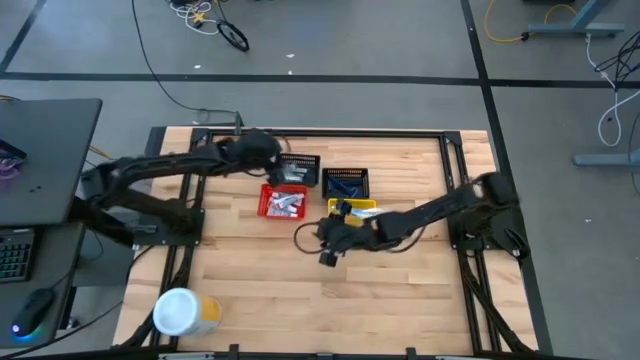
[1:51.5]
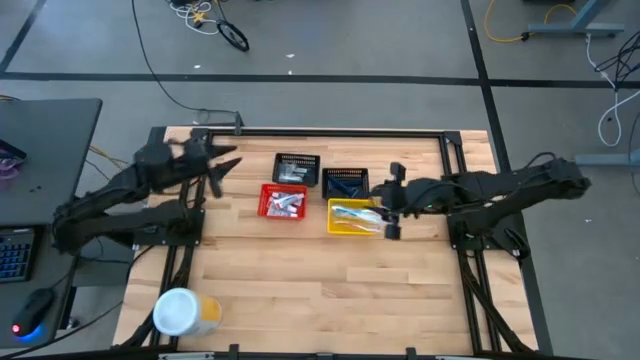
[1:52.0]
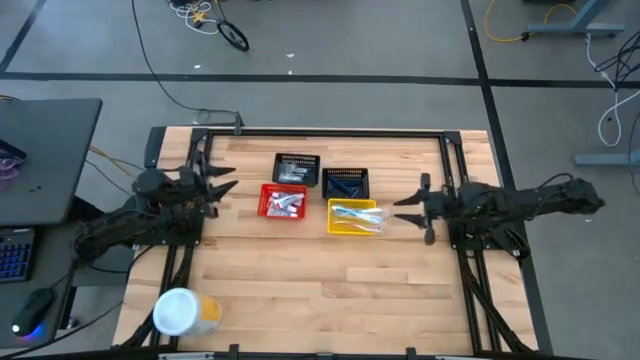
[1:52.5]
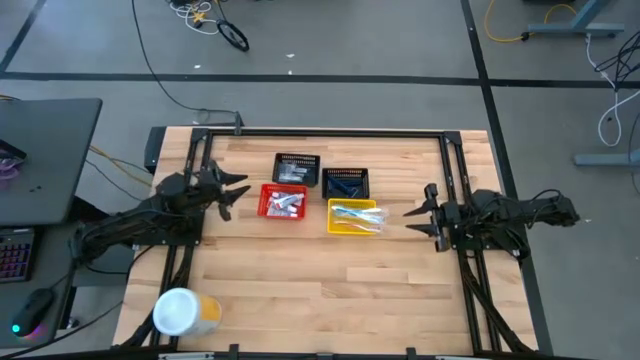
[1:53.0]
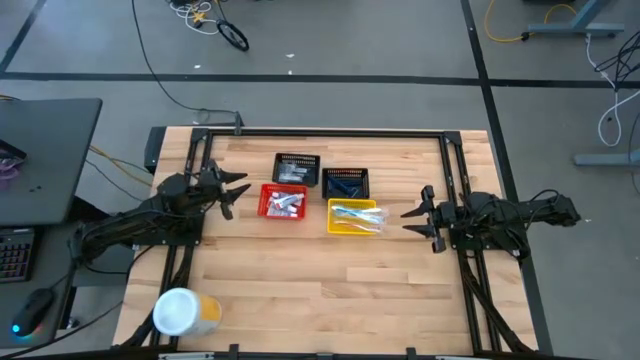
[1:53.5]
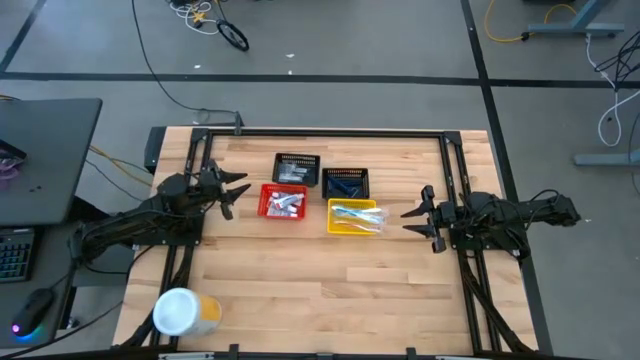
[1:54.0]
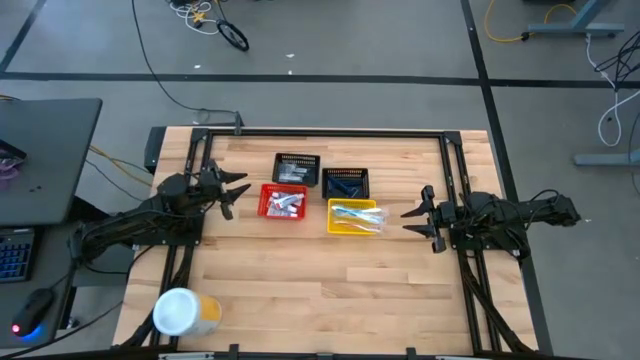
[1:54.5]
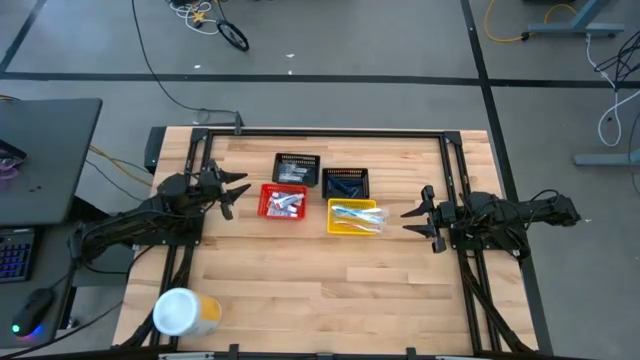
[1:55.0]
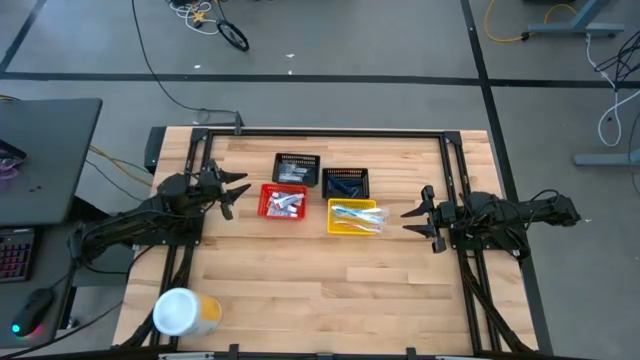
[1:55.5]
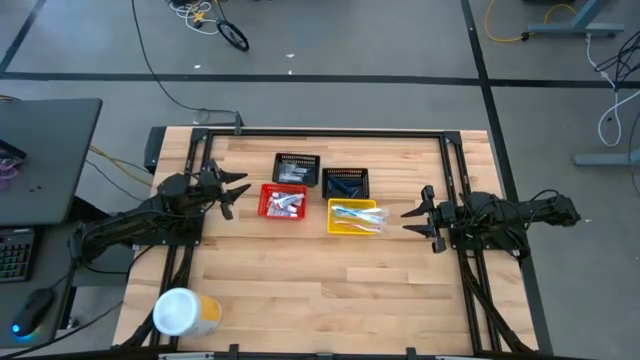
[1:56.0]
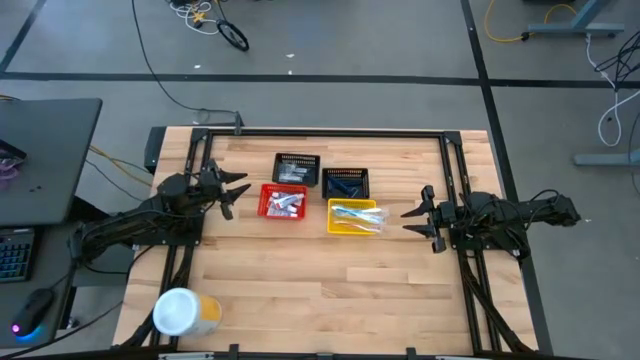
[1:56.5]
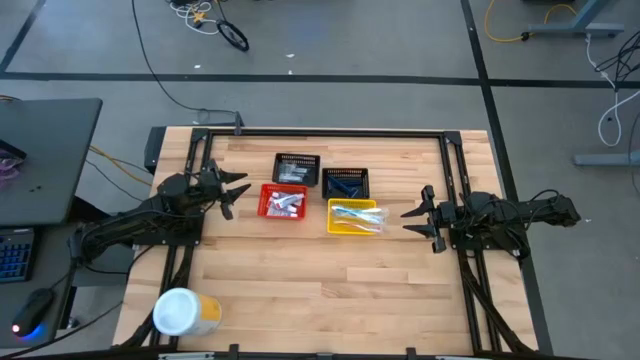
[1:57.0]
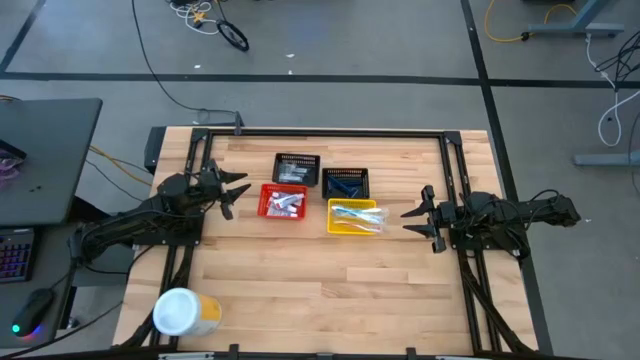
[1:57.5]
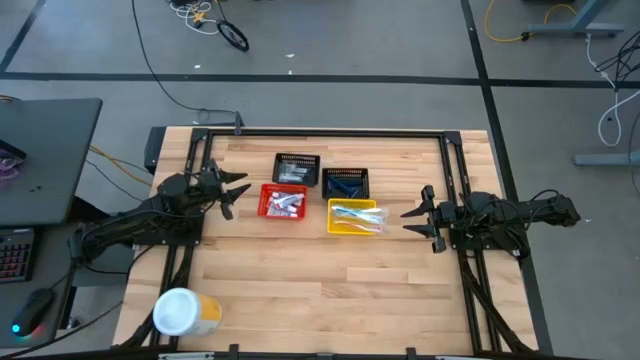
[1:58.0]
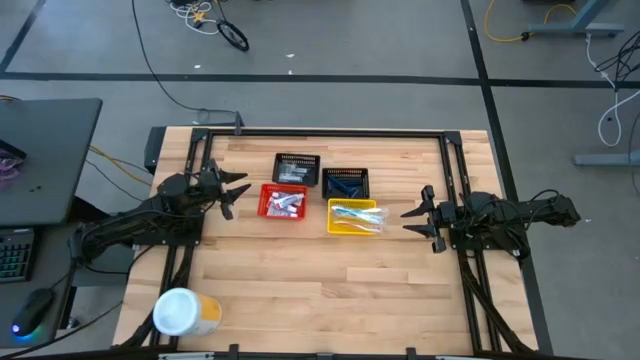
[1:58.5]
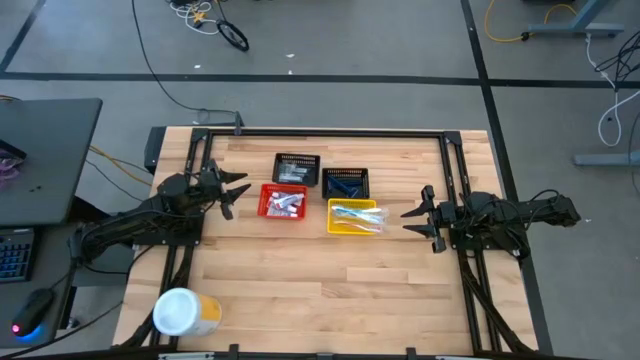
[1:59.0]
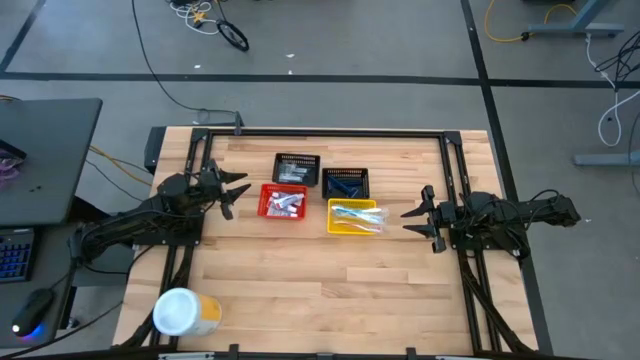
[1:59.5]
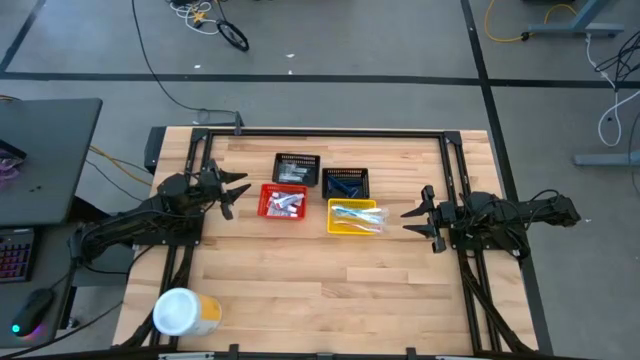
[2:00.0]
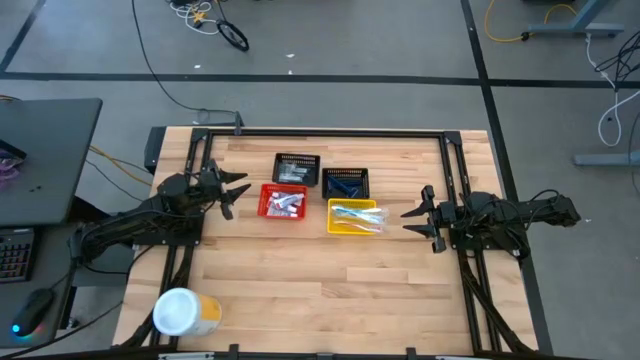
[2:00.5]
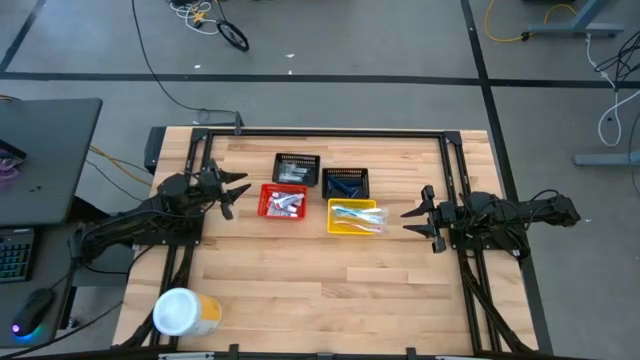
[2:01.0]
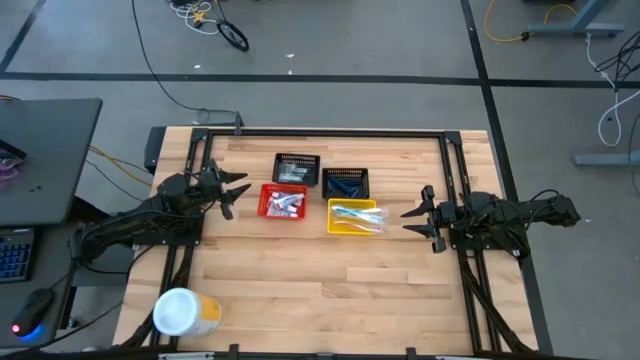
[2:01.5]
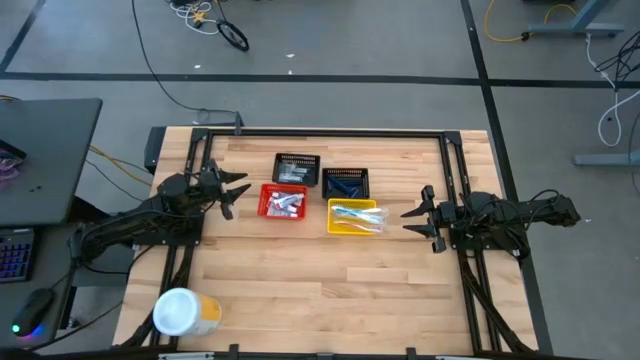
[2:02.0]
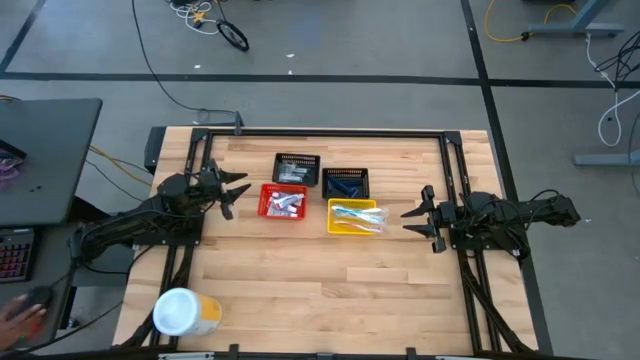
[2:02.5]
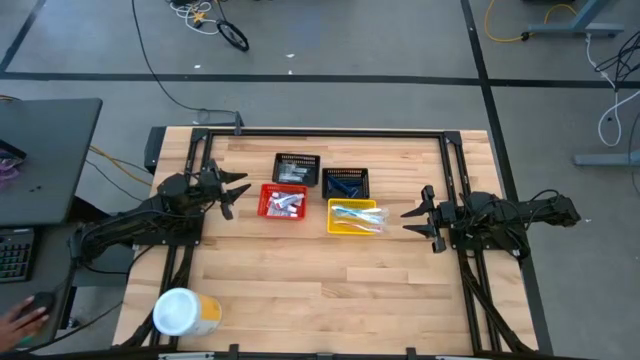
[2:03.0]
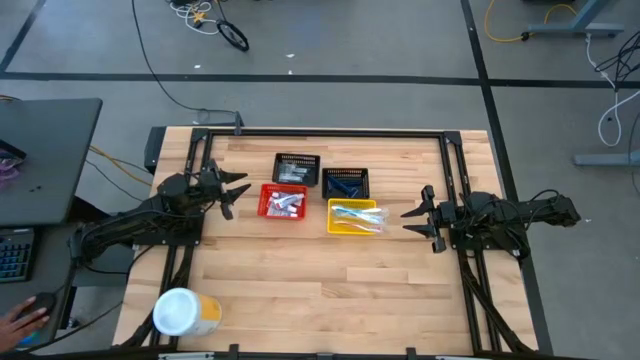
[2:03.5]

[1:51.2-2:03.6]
Task: Pick & Place Travel size toiletries
Return to Home Position

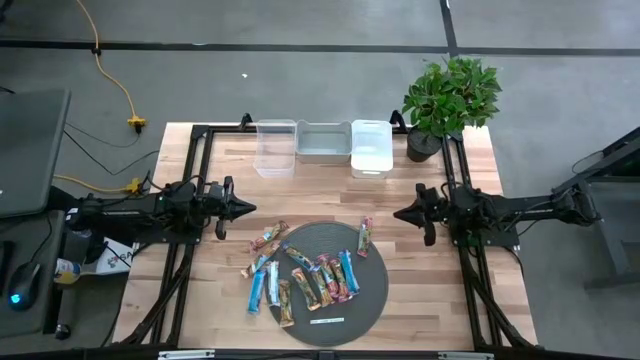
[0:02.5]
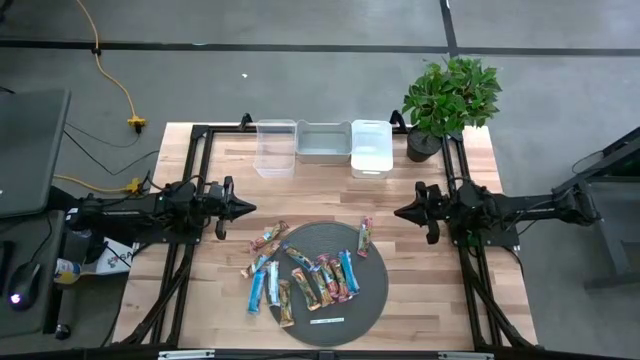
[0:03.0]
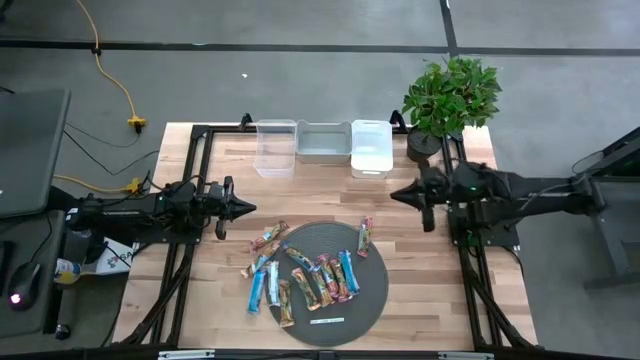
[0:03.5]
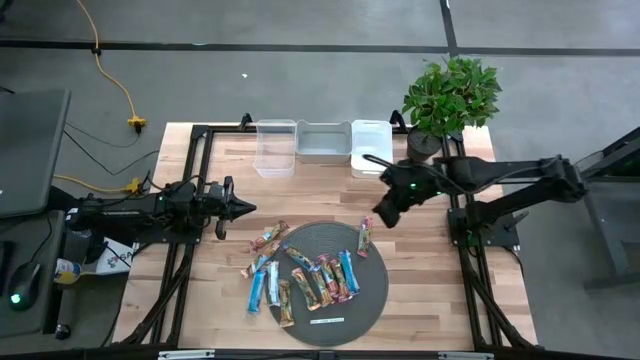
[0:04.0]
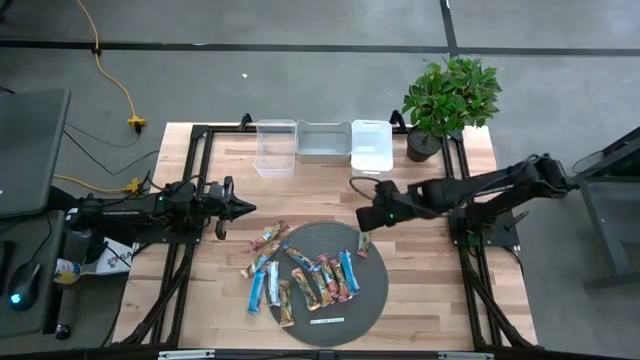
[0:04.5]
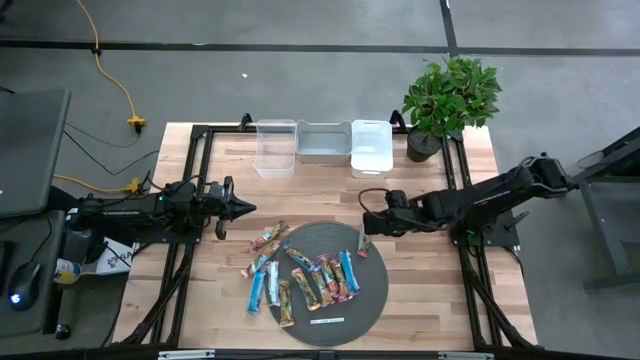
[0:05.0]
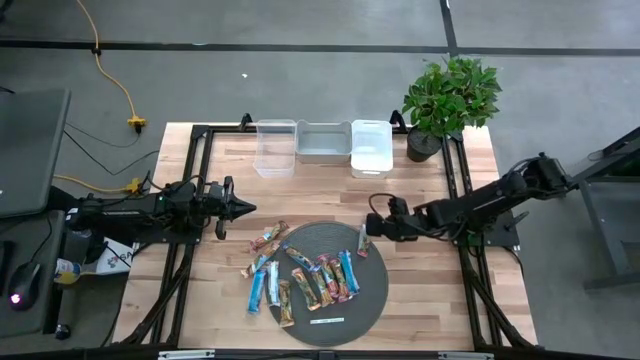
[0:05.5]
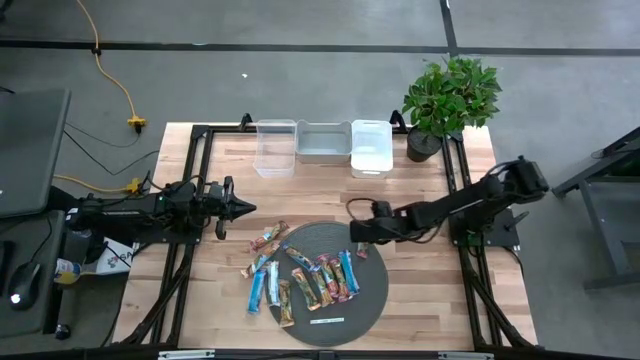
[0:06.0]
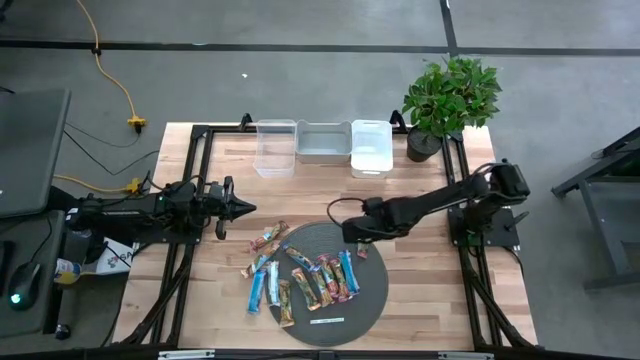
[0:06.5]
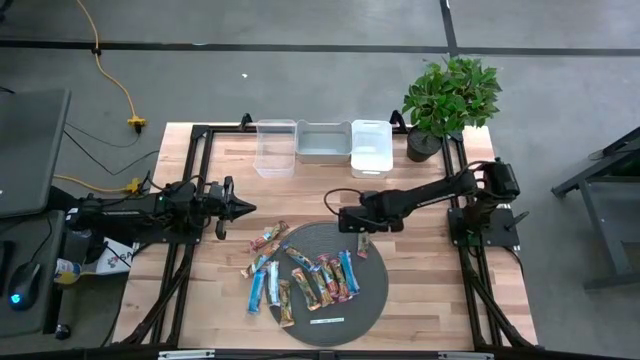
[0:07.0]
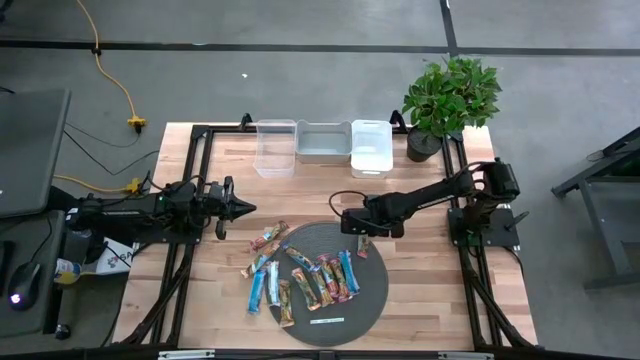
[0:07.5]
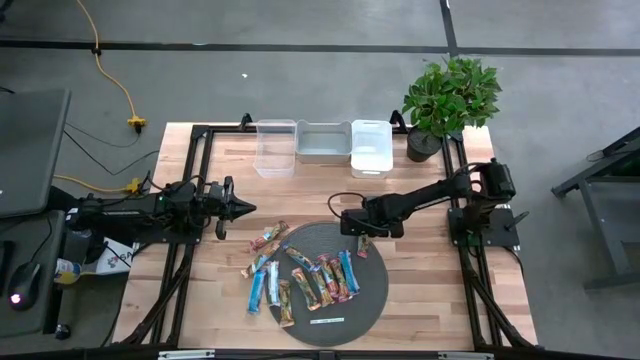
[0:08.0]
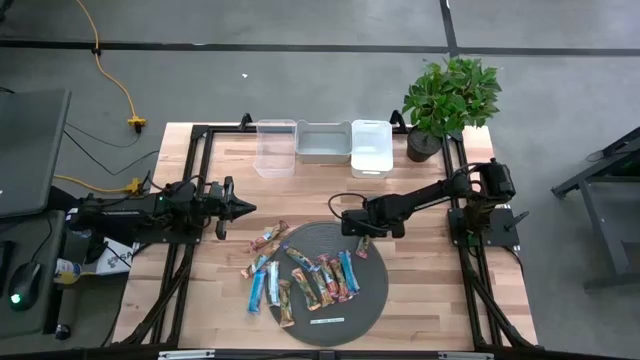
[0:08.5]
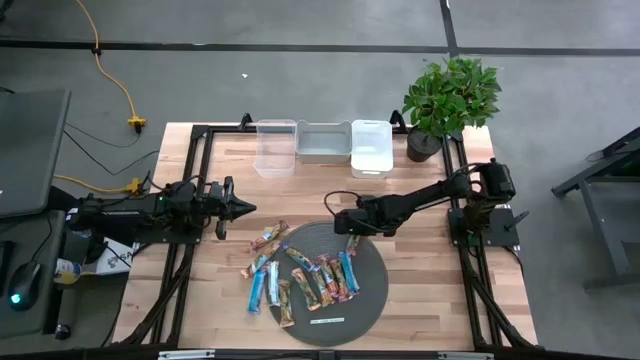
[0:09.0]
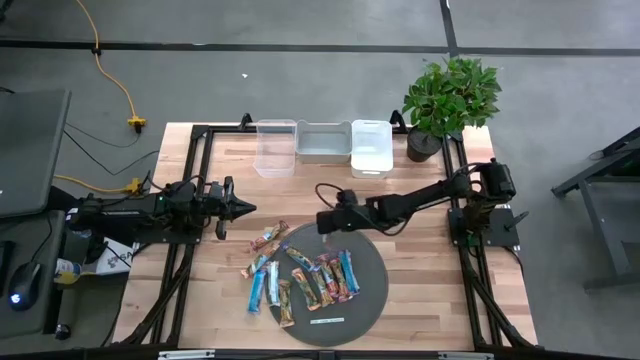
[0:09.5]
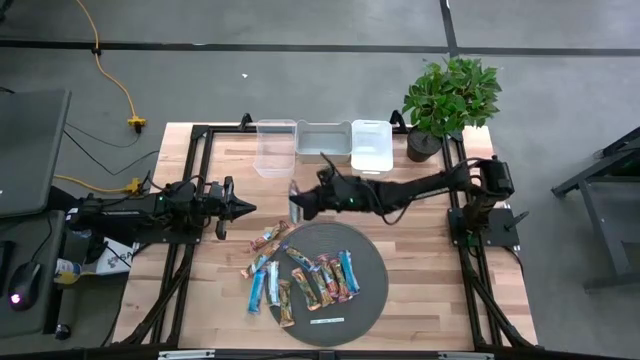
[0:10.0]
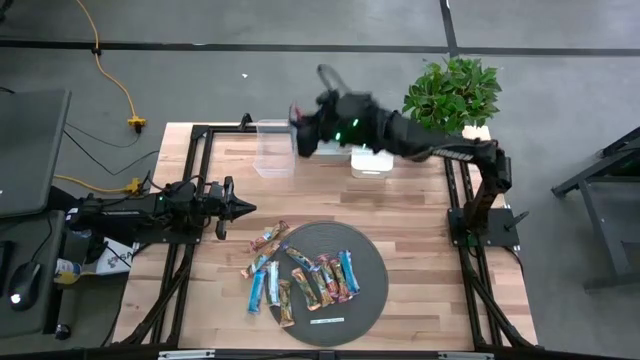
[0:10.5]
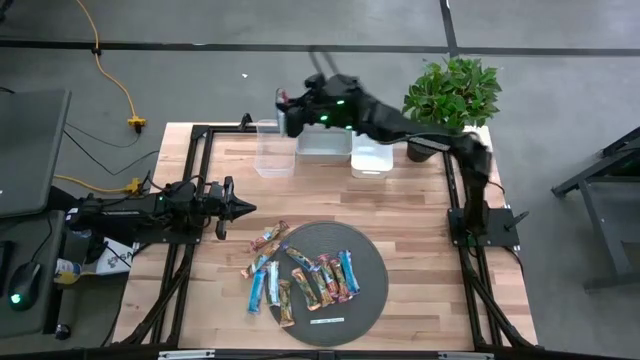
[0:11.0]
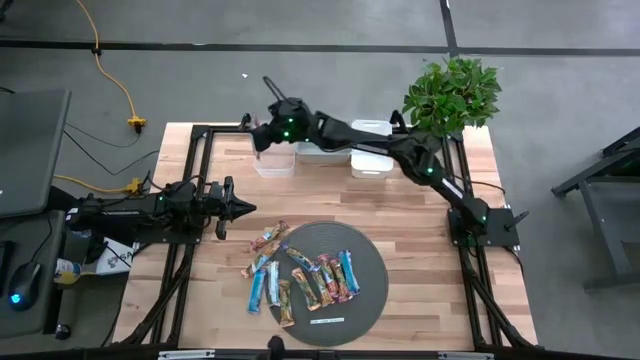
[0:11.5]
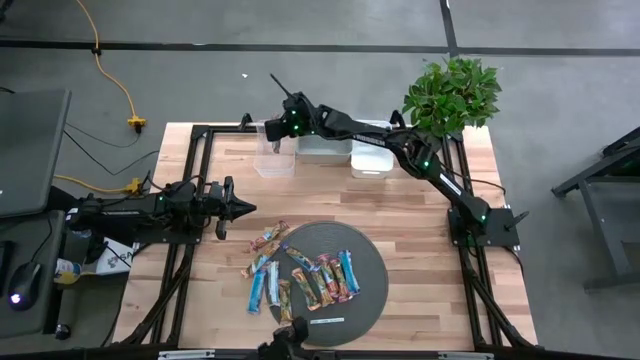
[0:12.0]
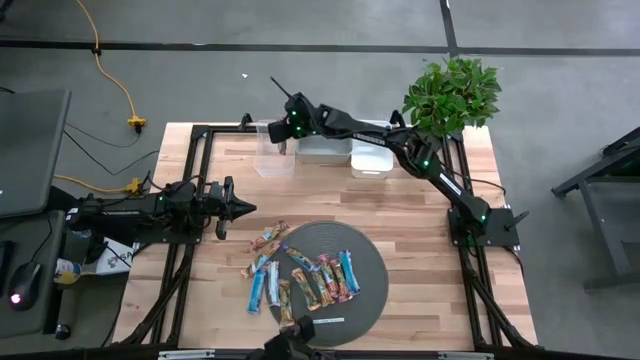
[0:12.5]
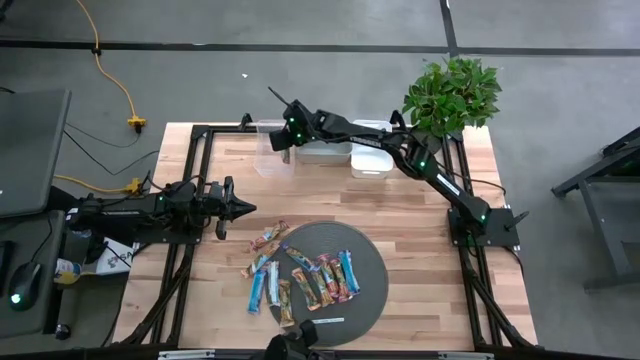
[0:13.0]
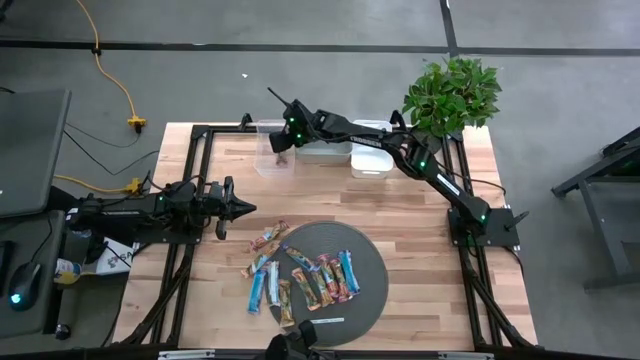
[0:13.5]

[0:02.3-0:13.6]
Task: Pick and place Granola Bars by type
Put the red granola bar into the transparent bin
